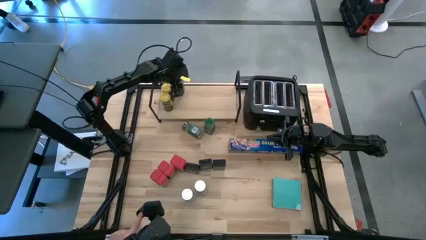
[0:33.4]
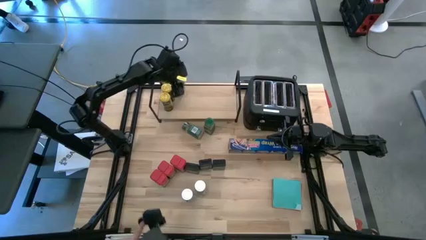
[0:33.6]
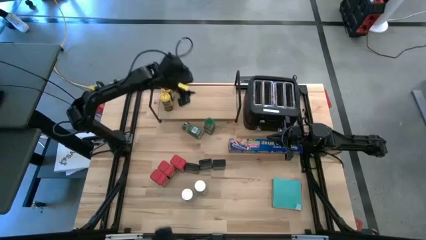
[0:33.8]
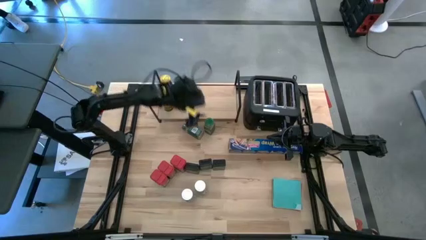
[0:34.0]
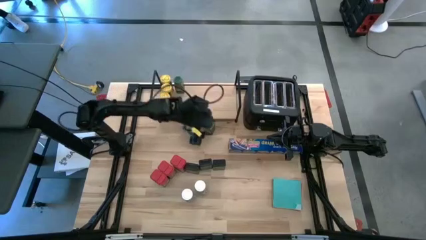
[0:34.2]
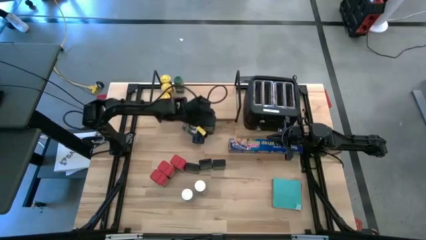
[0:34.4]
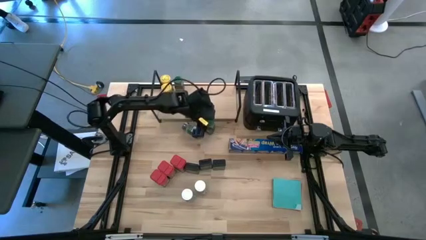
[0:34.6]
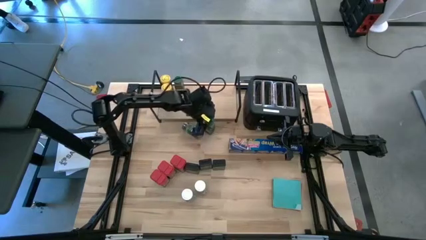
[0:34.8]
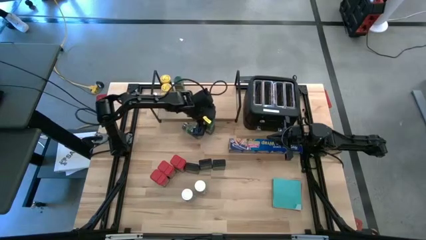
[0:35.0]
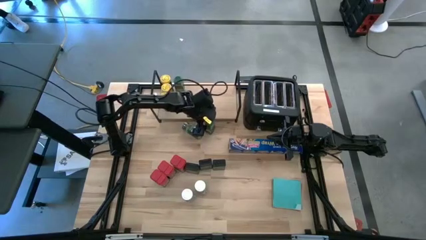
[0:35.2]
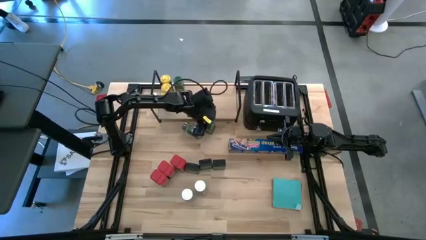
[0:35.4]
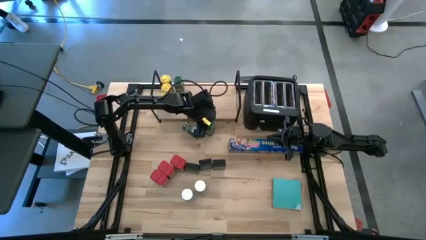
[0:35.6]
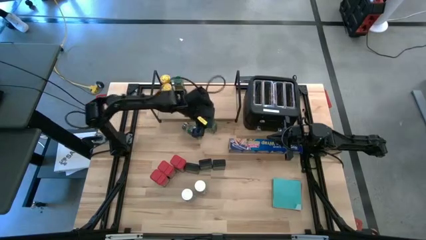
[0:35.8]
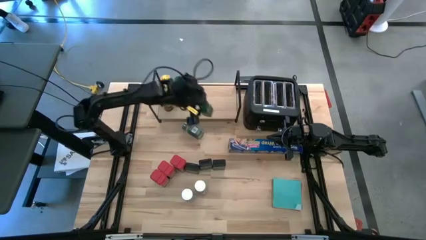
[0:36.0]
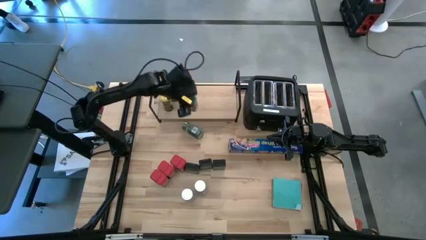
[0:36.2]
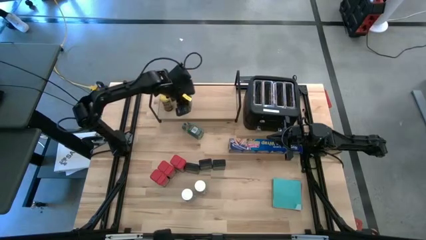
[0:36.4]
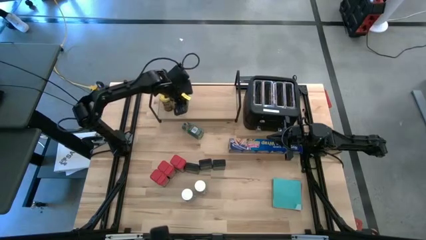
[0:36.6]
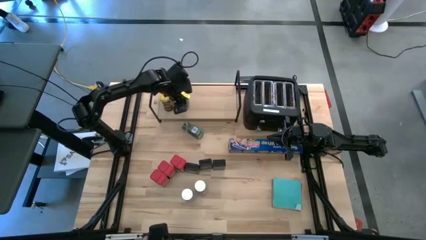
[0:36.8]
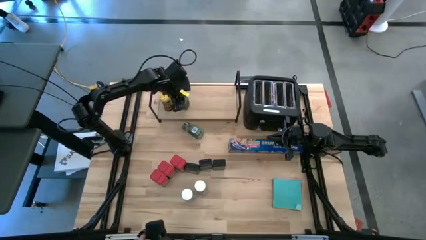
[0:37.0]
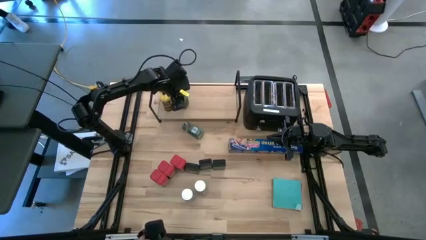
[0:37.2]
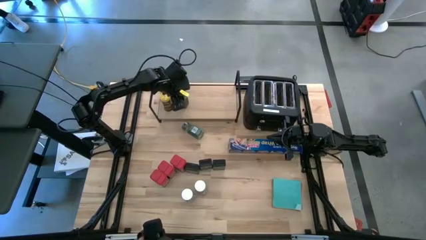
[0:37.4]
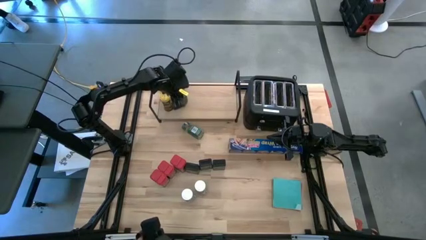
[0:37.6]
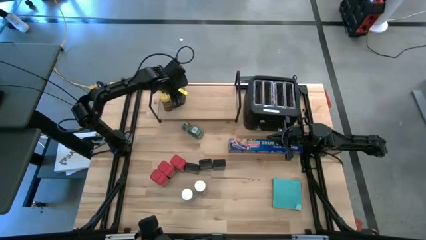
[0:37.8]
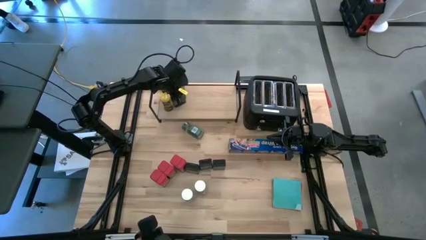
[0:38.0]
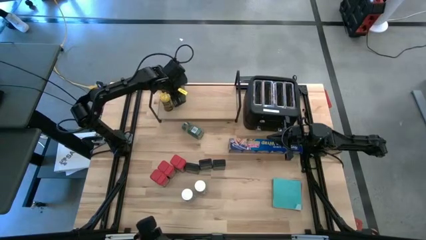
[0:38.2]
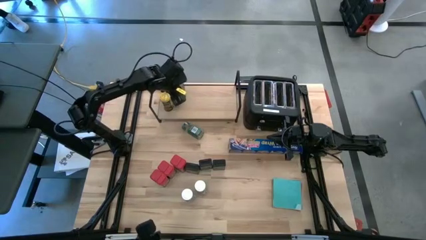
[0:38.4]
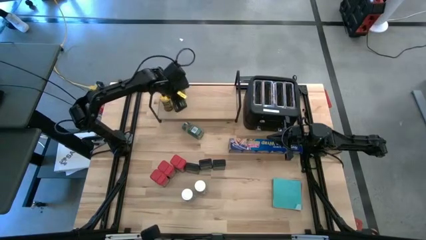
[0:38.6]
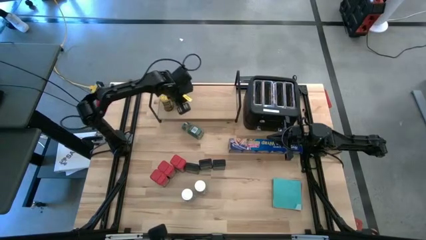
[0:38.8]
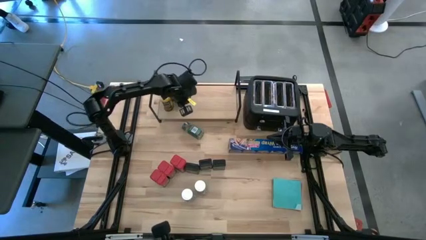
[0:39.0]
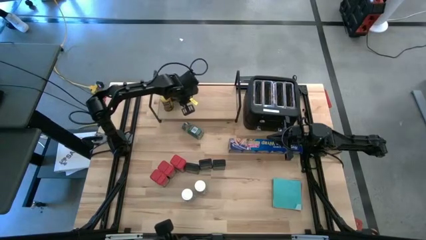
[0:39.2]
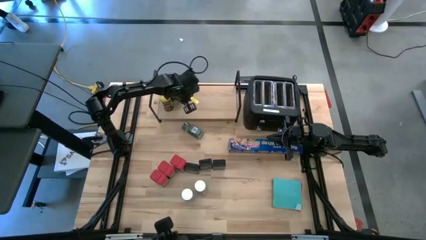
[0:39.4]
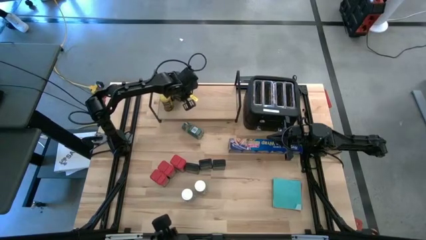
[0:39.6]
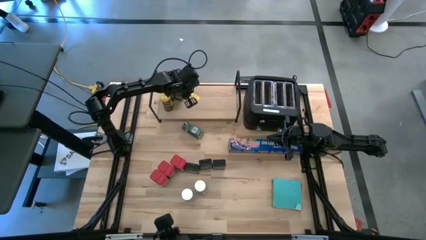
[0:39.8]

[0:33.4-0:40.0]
Task: Shelf spices
Put the right green seasoning bottle on the shelf aligned with the other green seasoning bottle

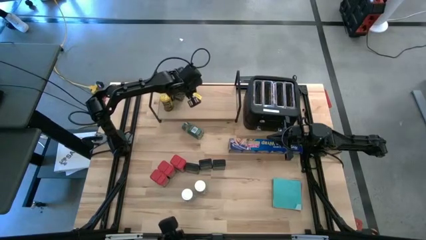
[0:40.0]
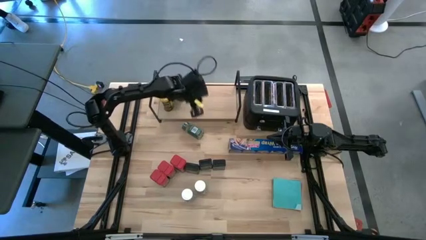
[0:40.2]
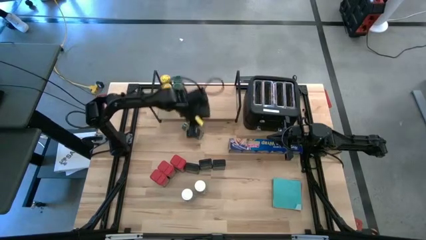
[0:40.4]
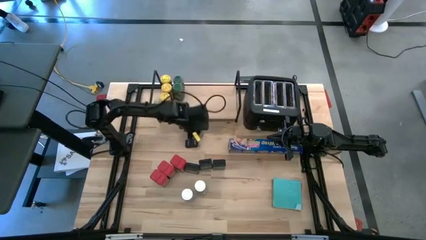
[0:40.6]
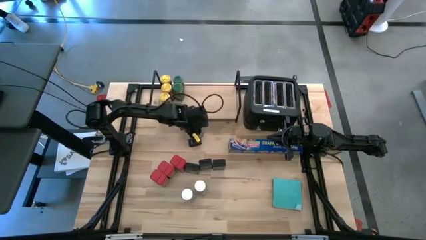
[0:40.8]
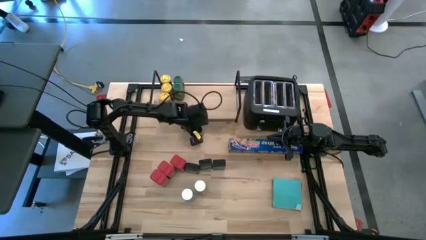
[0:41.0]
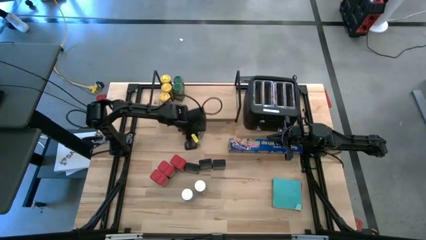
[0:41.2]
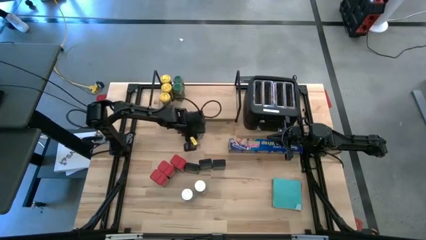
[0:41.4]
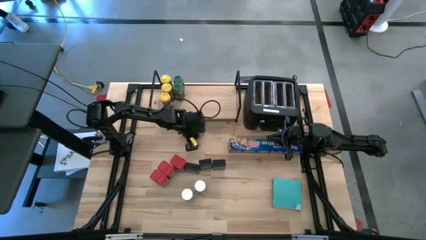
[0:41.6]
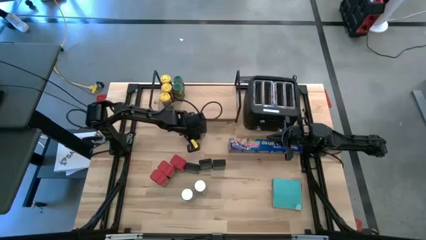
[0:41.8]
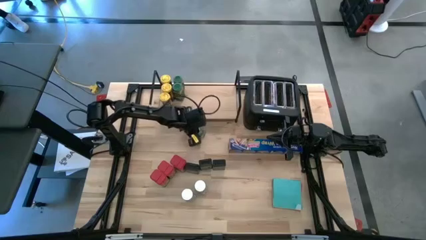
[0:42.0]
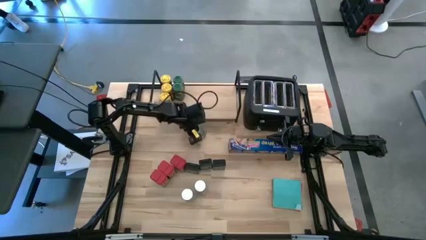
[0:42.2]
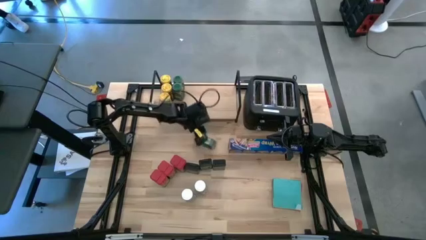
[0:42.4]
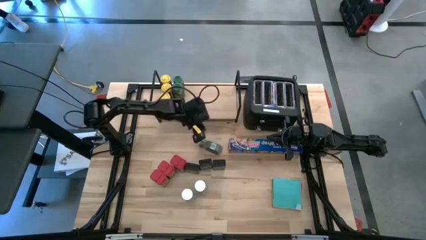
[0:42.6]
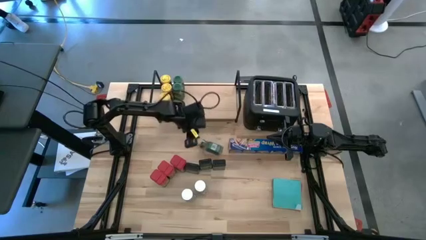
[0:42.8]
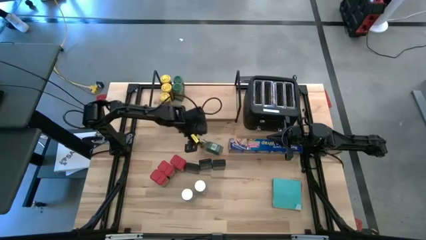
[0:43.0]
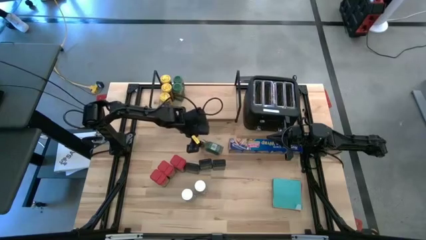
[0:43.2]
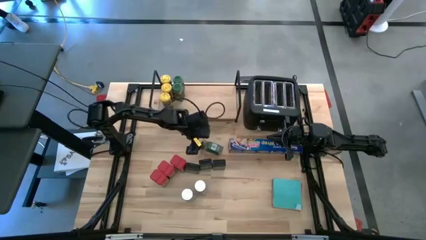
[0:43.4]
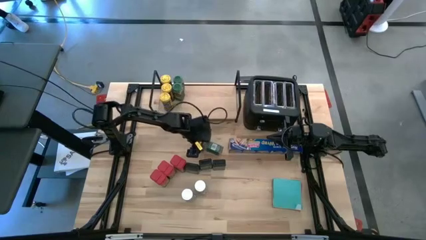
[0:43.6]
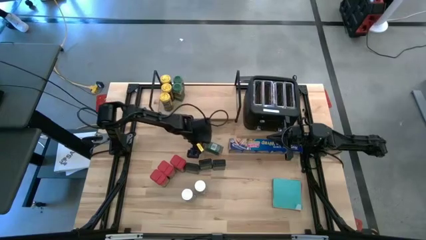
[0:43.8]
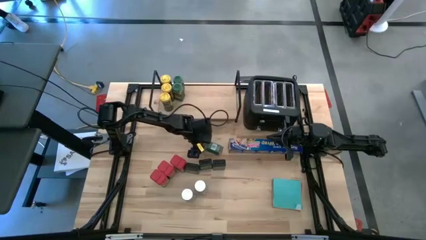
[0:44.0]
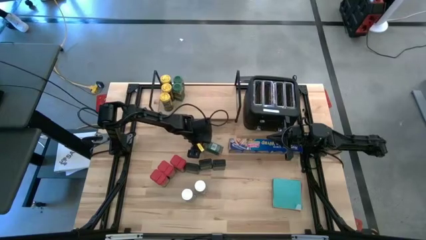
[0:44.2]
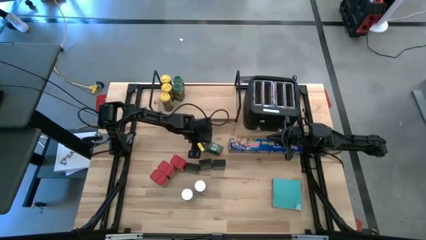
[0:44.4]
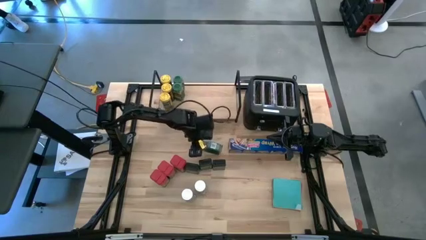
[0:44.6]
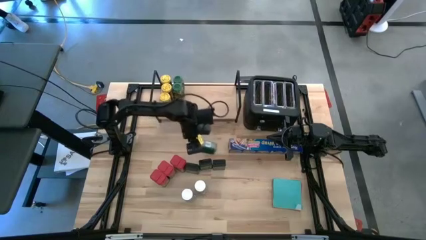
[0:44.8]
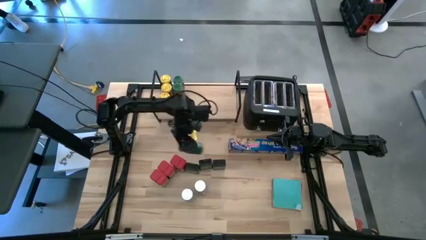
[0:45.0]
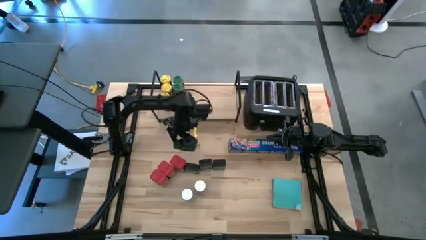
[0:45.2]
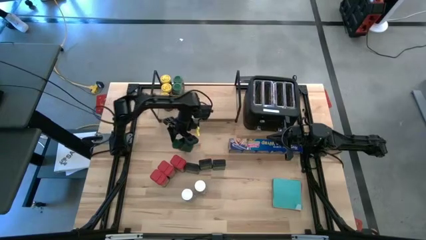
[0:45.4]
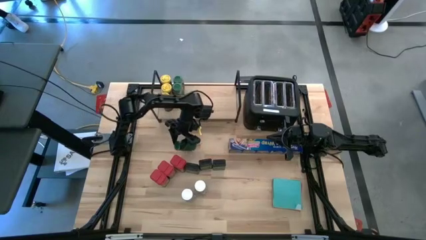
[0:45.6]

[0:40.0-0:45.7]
Put the green seasoning bottle on the shelf aligned with the other green seasoning bottles

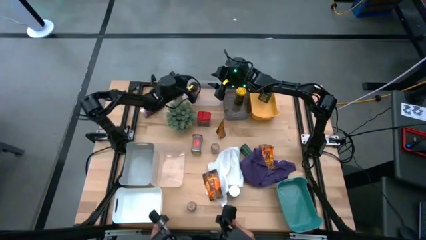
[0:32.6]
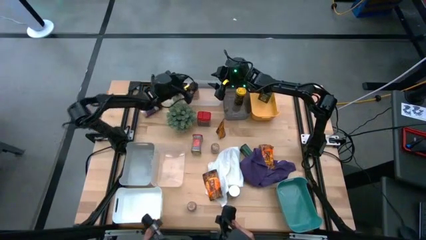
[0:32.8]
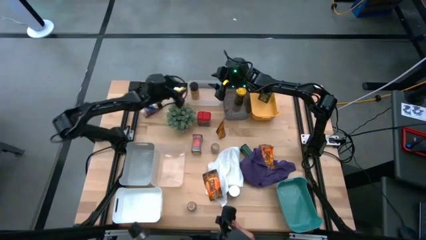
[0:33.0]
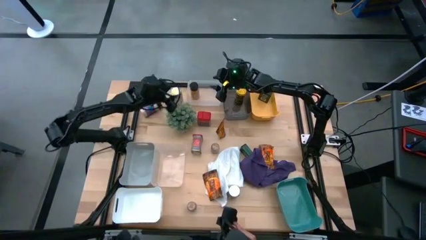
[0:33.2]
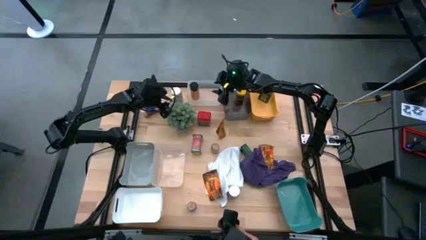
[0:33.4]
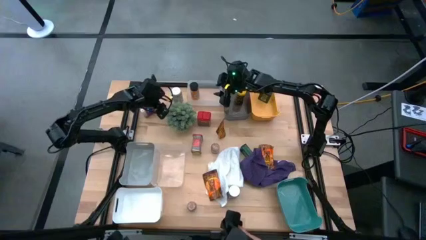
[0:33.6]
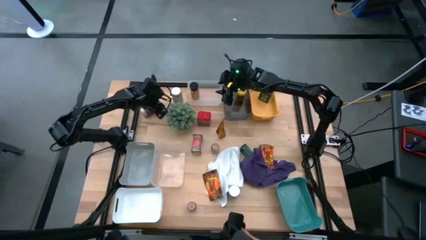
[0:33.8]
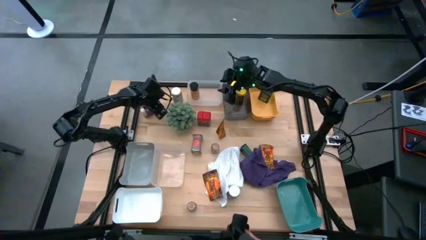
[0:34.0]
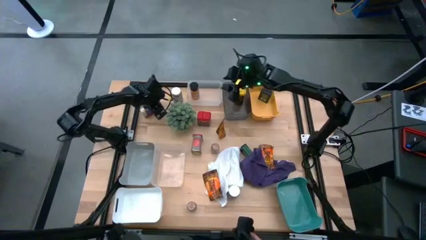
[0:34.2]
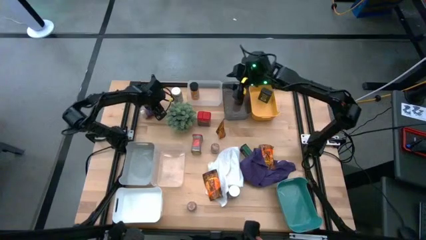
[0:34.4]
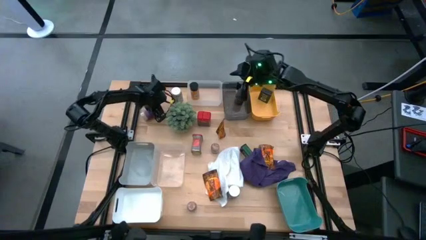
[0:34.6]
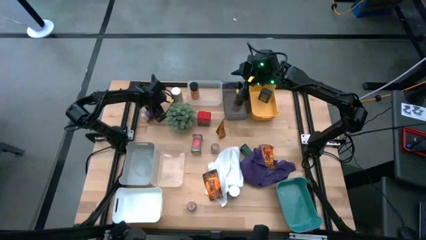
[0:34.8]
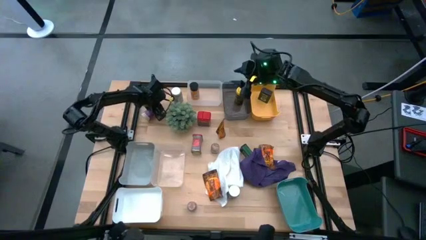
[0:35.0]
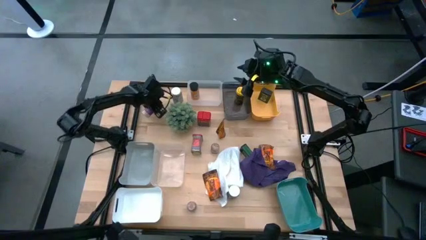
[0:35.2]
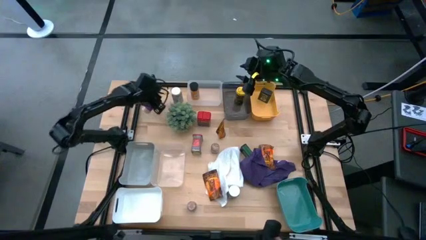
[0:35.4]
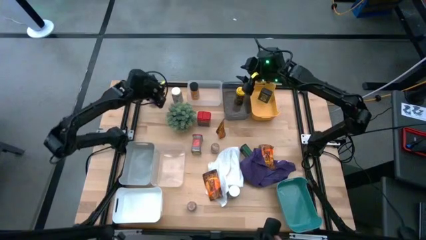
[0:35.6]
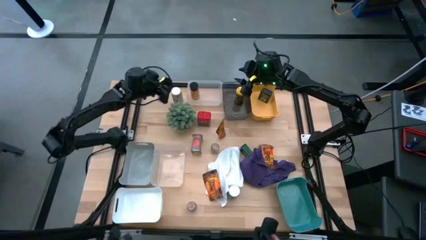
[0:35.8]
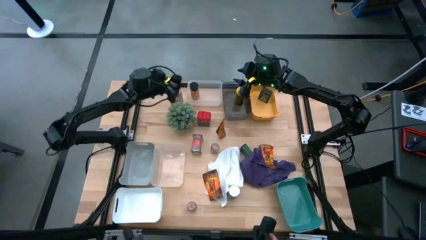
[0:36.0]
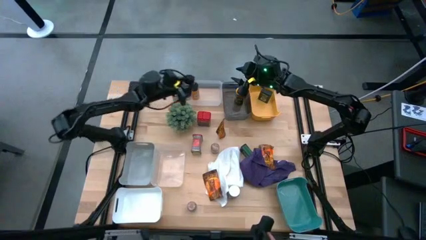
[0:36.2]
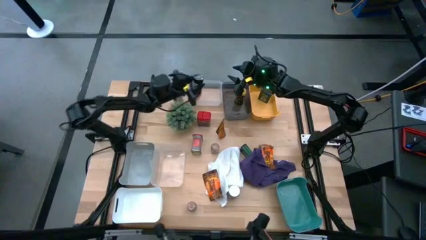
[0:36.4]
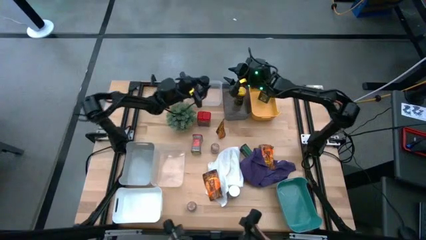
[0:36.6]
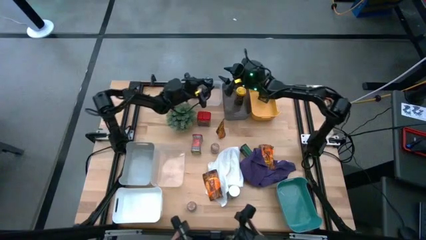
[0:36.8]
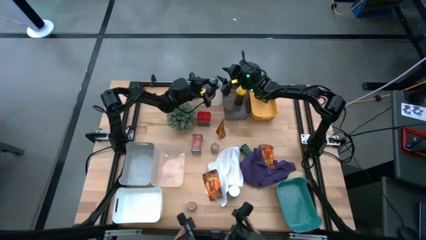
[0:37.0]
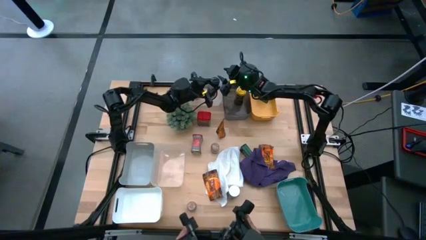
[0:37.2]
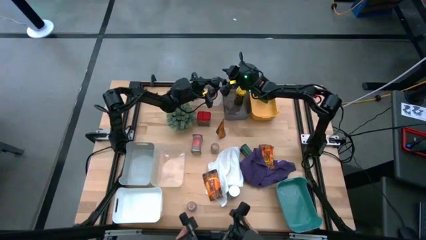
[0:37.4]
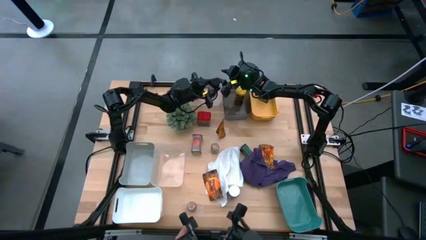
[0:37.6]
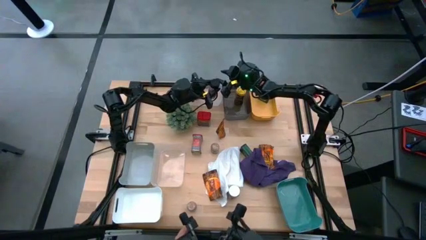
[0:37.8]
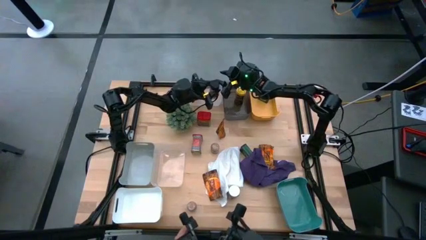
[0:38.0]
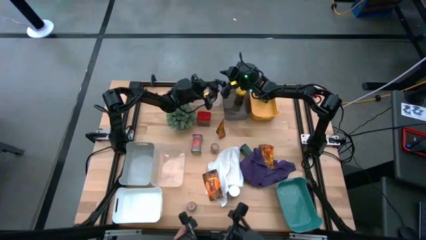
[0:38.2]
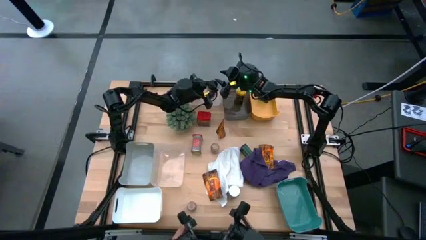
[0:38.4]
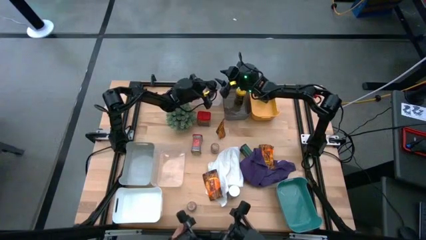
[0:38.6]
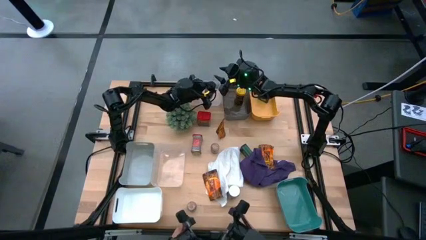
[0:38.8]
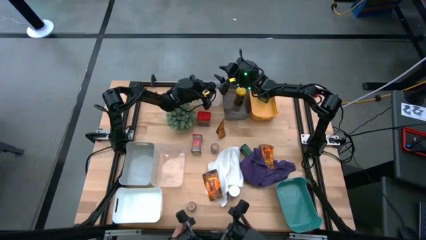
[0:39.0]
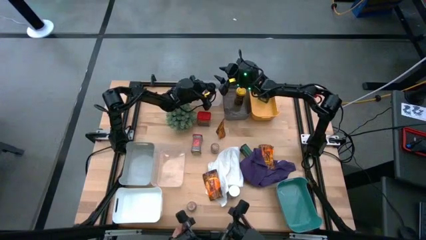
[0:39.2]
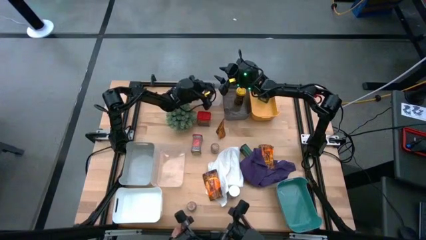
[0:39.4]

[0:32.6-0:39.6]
Task: Sort spices by type
Put the violet seasoning bottle into the top transparent bin
